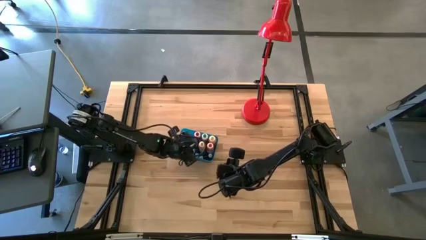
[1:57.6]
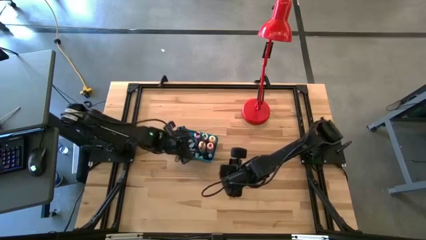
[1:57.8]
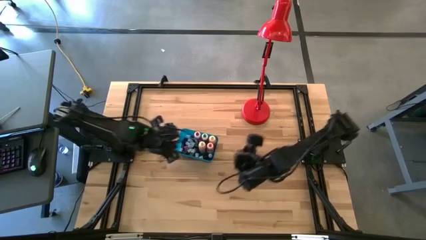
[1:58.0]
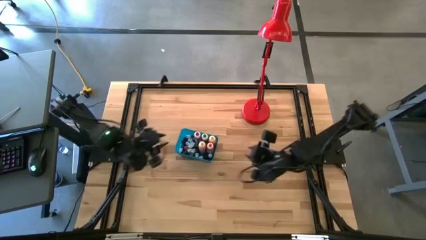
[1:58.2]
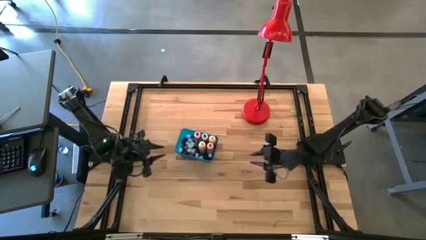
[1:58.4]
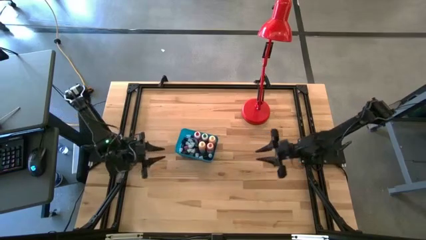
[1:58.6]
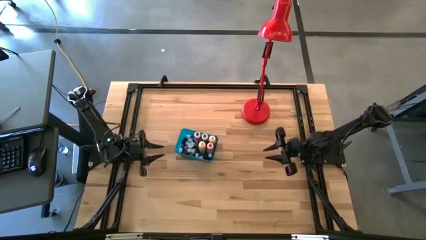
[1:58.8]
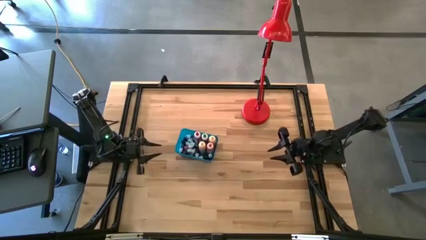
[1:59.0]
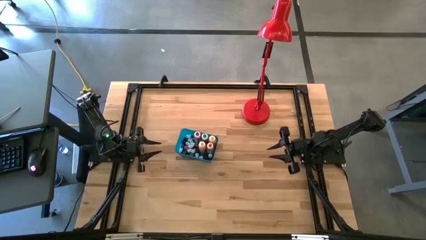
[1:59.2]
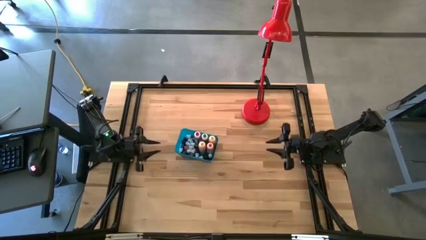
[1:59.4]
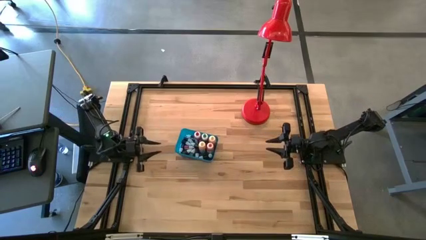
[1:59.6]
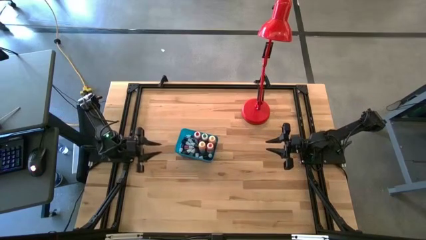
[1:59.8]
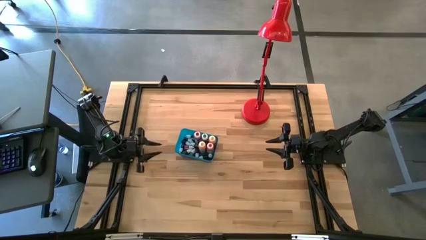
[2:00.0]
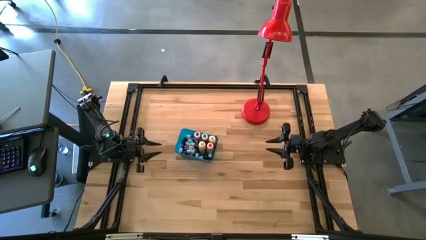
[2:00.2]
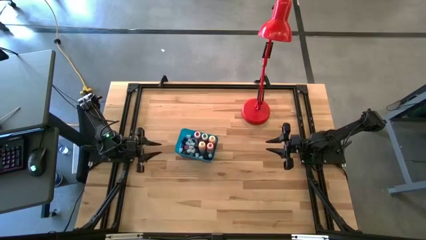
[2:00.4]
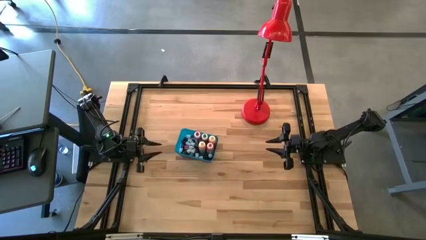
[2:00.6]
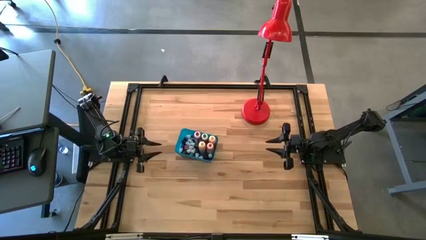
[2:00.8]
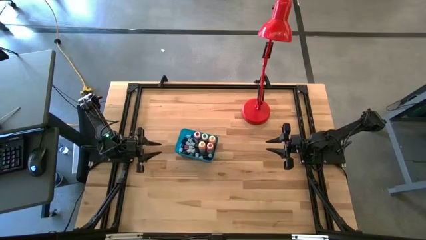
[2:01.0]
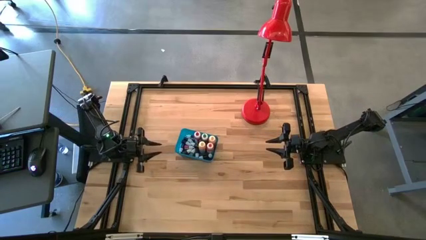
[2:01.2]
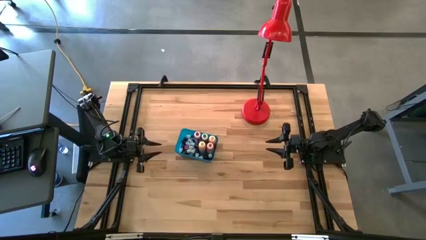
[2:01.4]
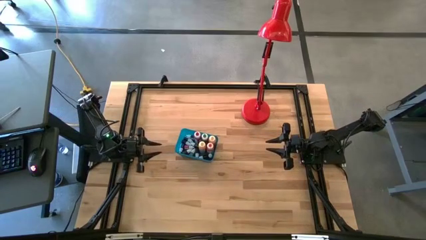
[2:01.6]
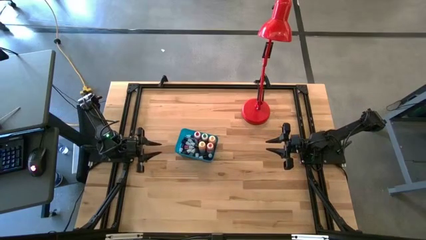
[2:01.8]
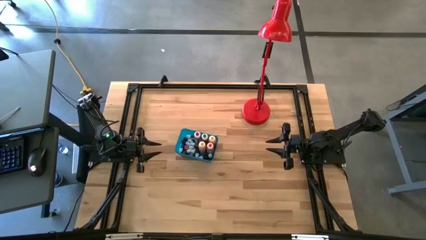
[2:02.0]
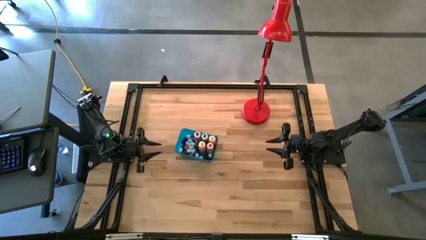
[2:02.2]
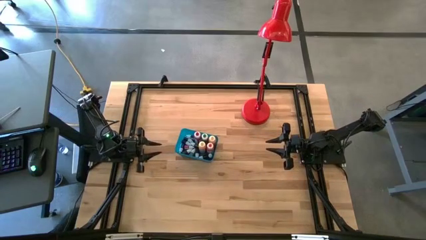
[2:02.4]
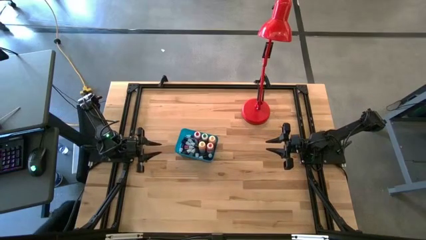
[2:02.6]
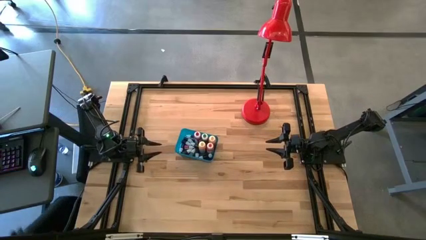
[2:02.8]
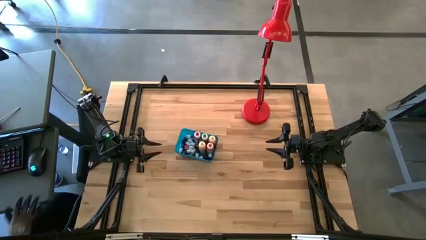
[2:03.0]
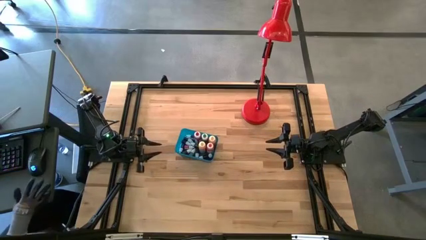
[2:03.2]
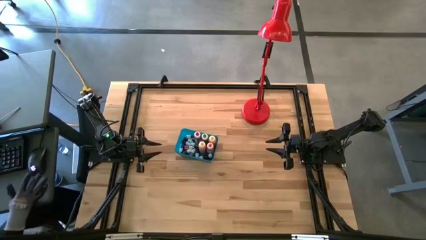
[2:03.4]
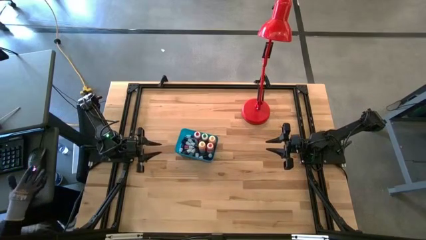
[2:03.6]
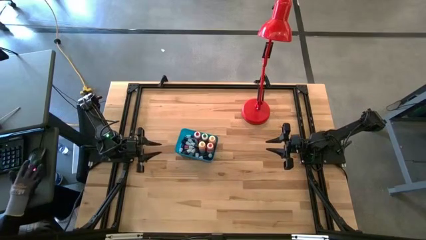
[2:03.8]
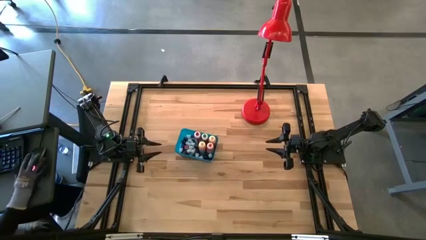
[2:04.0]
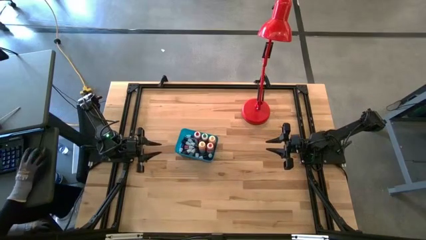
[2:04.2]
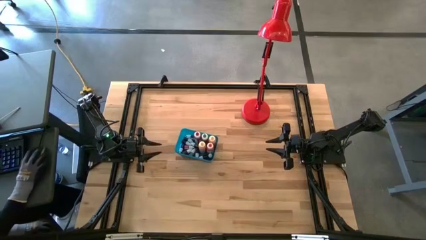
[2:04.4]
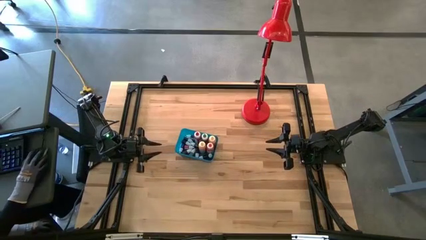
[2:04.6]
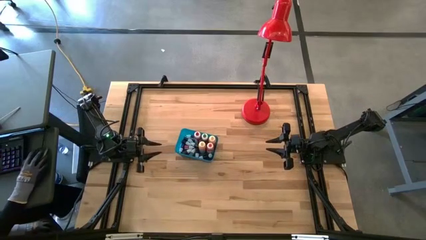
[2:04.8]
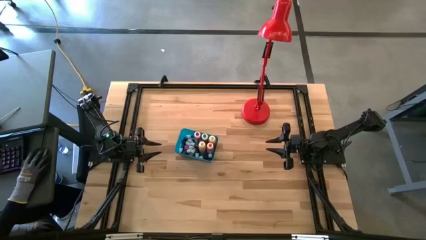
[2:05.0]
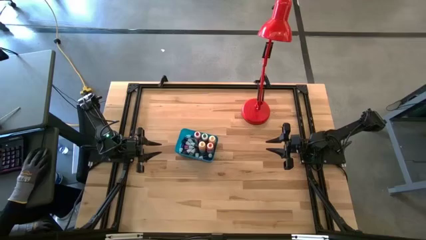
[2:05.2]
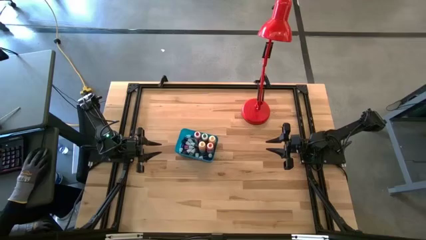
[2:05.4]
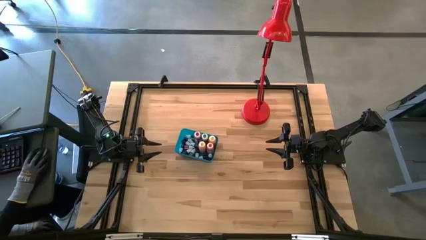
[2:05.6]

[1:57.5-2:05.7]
Task: Pick & Place food coloring
Return to Home Position

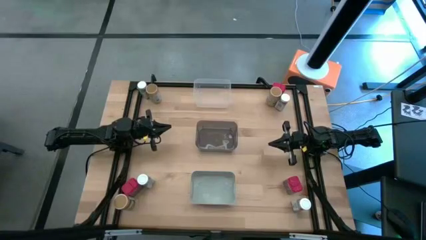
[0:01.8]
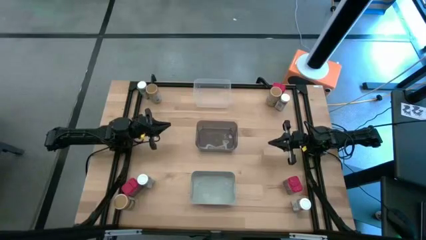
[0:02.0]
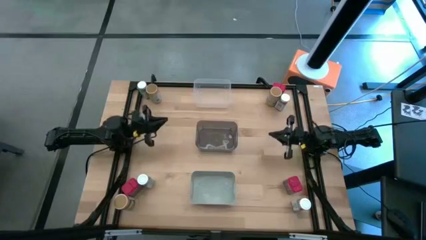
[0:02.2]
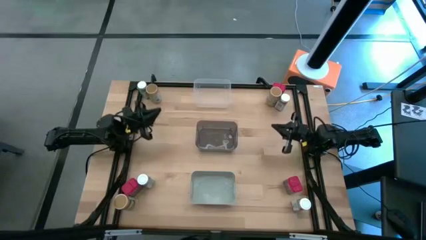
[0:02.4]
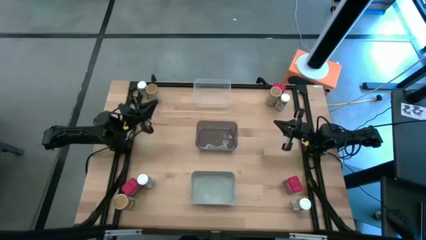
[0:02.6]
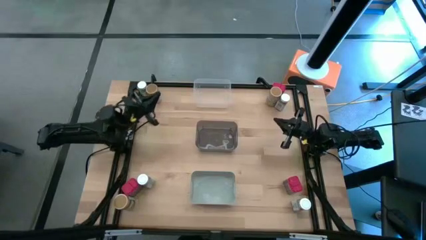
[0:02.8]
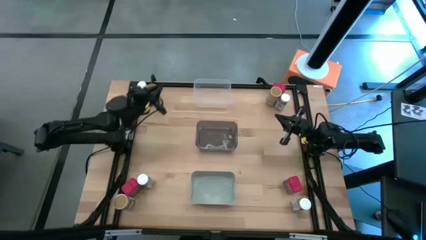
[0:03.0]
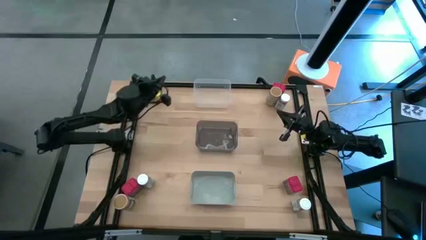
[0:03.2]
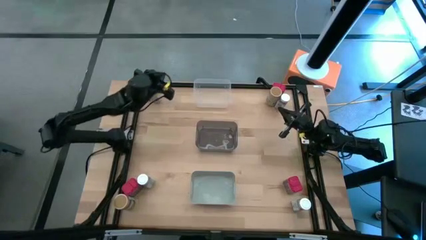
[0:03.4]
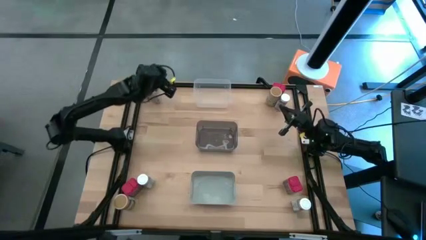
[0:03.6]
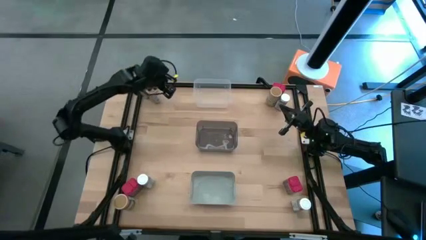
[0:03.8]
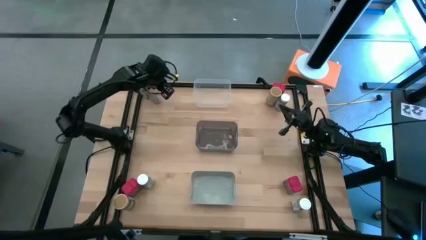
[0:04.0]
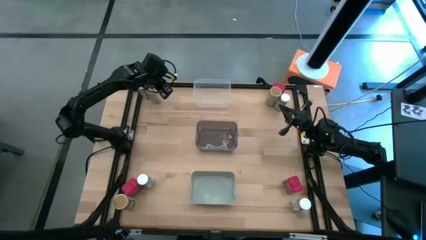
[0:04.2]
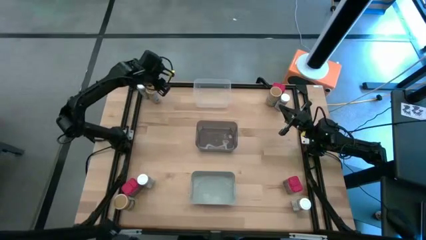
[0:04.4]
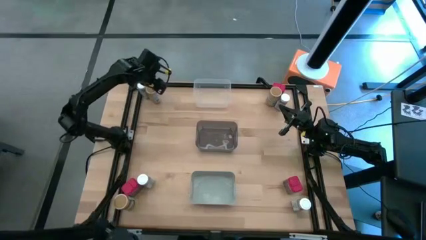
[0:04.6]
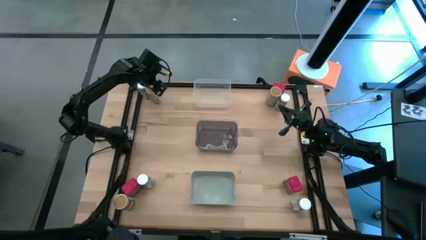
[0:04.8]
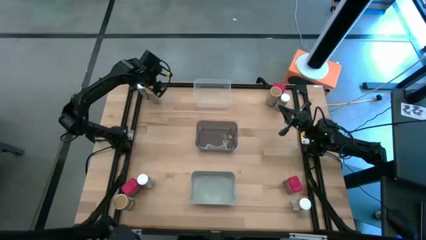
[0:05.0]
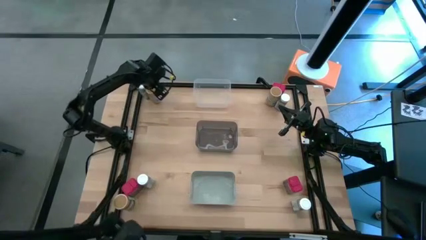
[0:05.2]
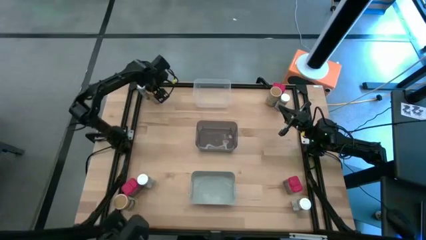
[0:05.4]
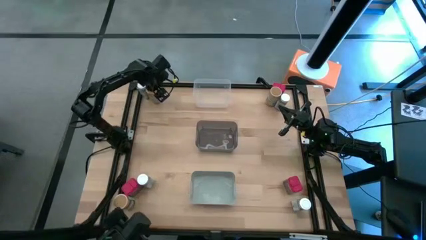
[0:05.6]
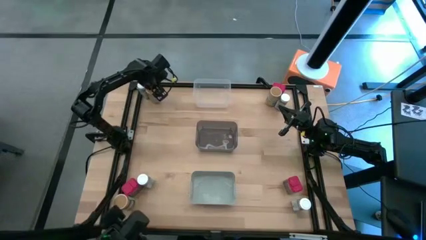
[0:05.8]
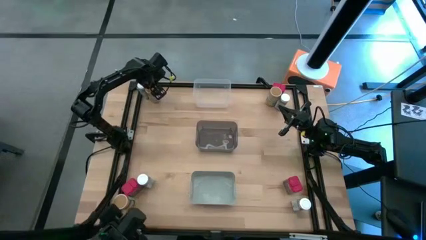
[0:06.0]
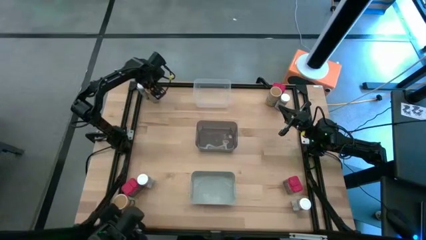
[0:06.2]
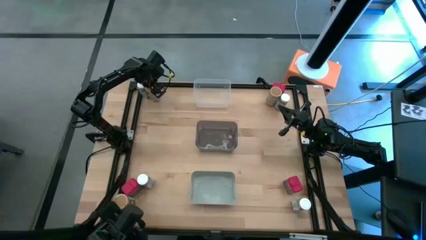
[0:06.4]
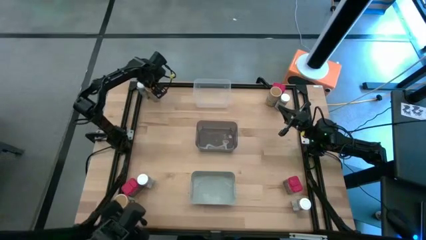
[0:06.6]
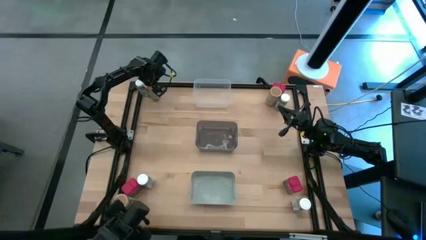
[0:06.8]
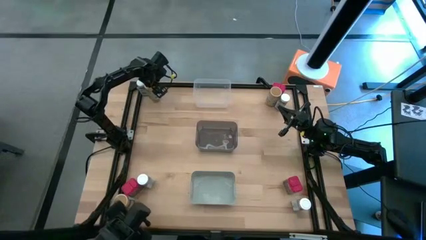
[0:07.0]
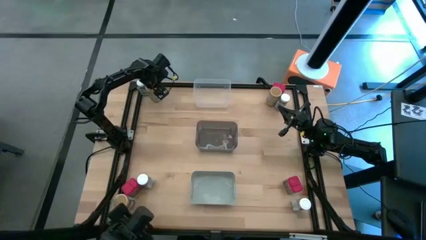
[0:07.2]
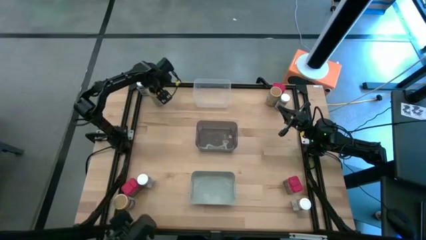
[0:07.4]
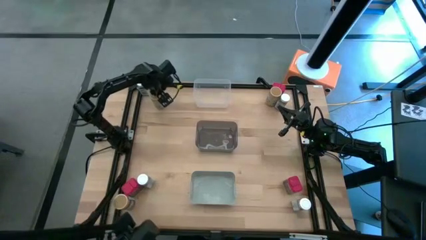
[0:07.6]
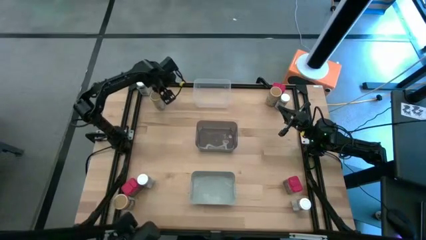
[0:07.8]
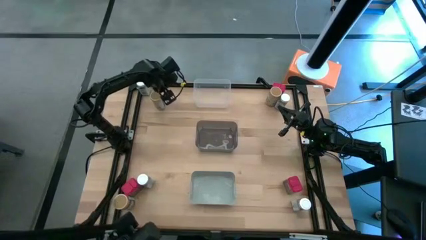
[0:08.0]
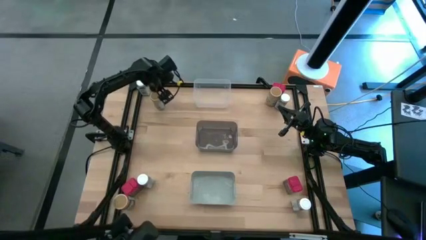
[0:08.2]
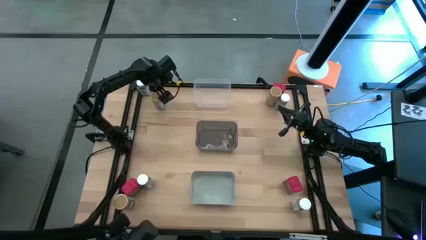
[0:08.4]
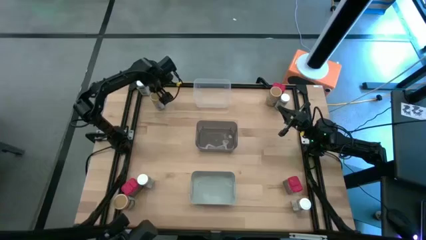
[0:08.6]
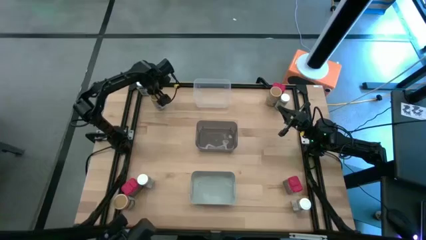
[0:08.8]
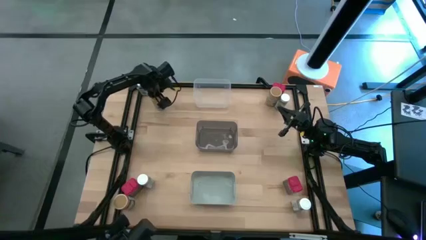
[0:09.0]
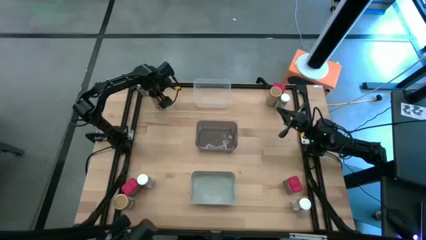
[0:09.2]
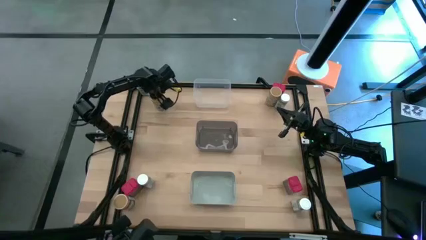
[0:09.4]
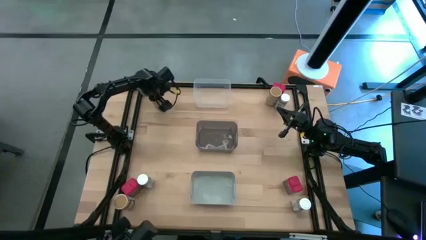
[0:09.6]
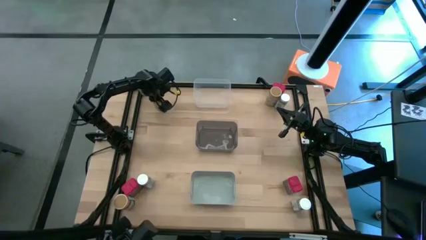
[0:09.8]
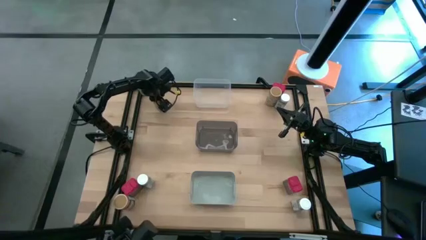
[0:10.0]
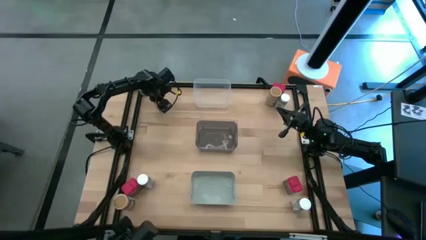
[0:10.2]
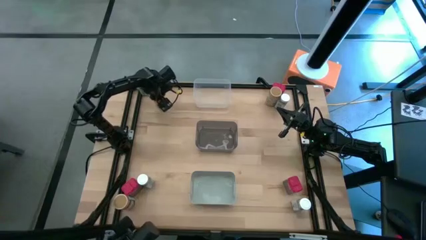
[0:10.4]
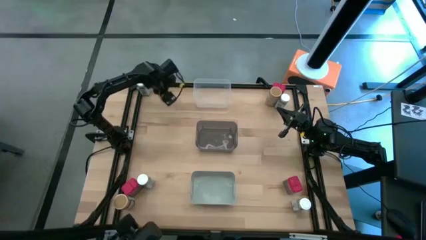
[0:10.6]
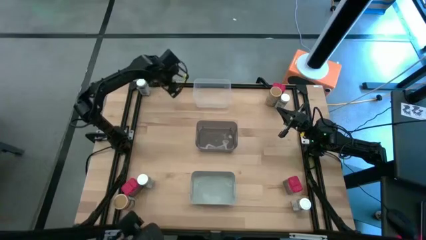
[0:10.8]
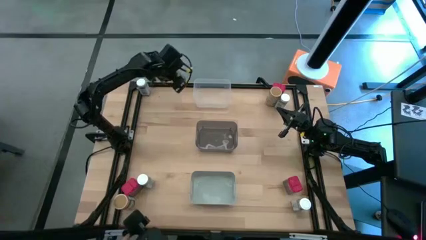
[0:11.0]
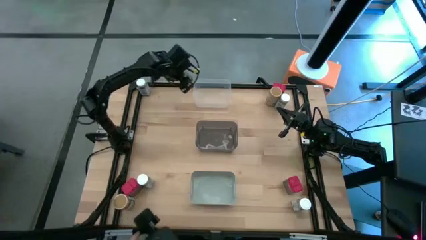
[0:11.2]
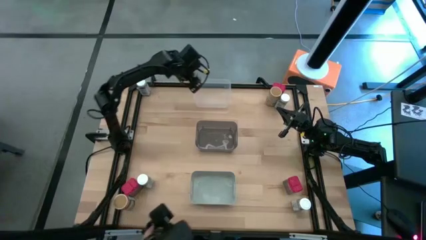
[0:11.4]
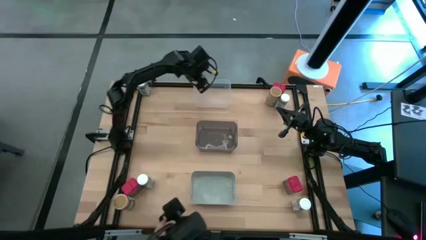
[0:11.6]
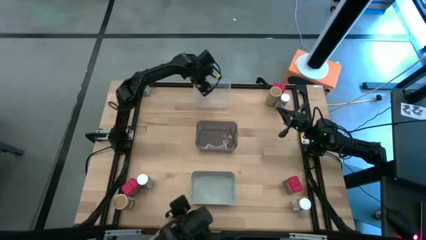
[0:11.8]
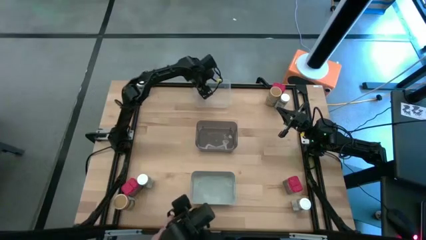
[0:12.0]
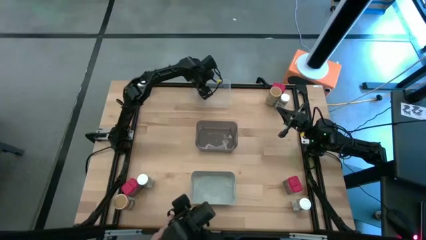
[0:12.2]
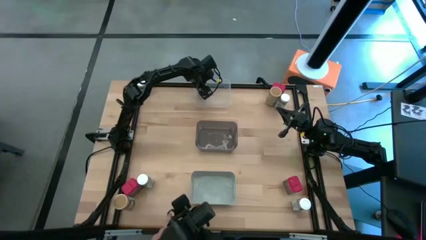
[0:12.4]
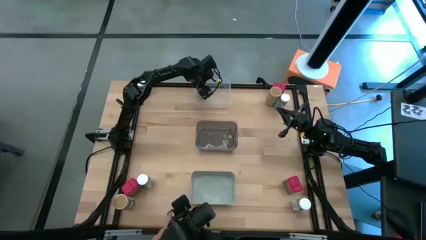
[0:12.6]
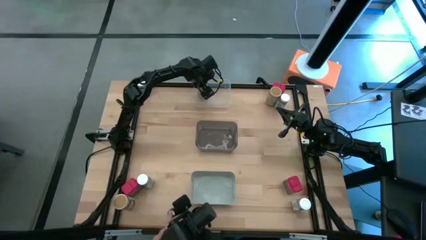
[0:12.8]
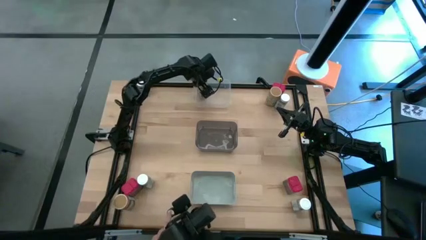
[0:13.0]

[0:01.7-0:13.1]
Task: Sort spices by type
Put the top left gold seasoning bottle into the transparent bin
